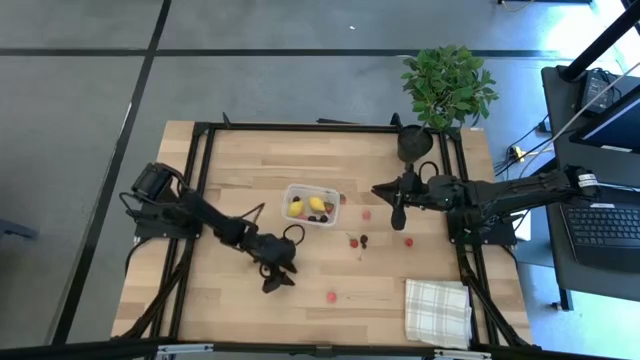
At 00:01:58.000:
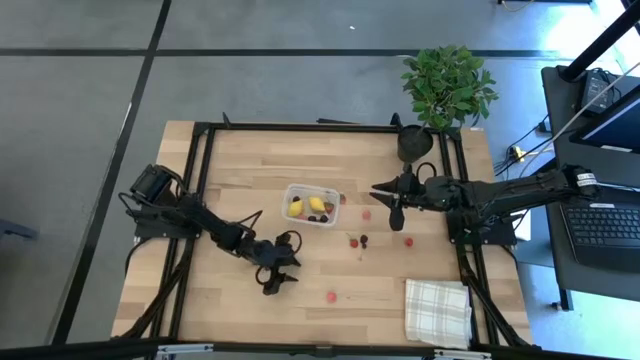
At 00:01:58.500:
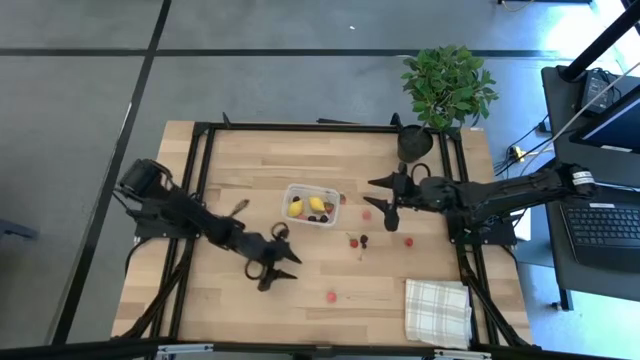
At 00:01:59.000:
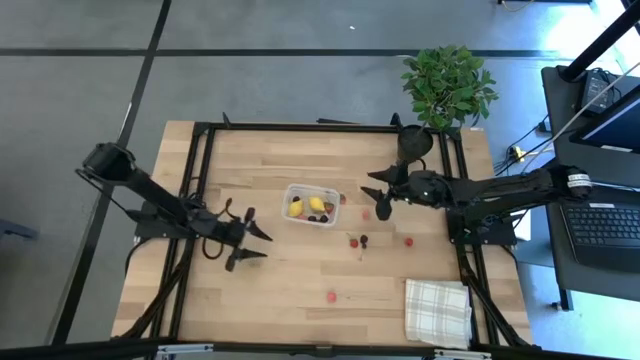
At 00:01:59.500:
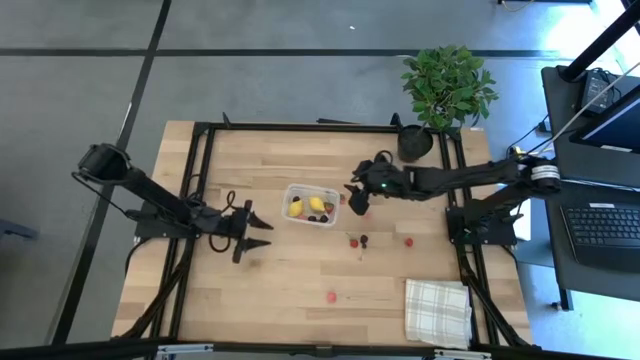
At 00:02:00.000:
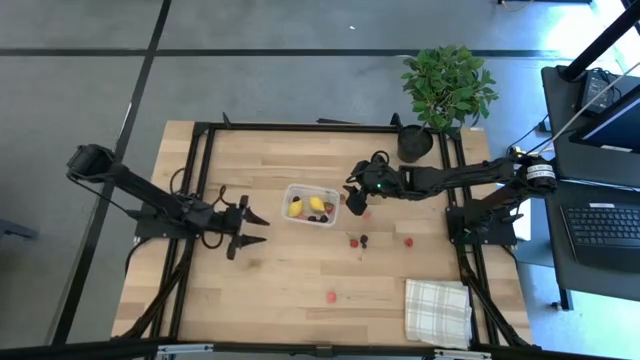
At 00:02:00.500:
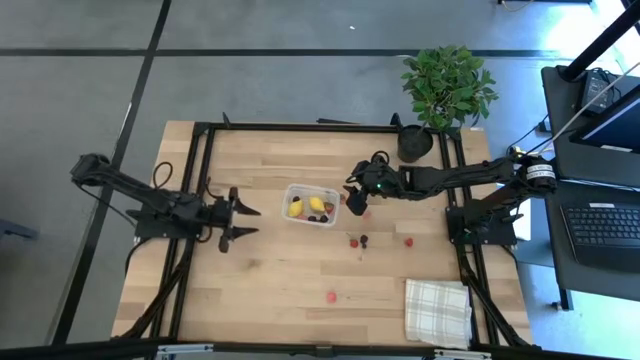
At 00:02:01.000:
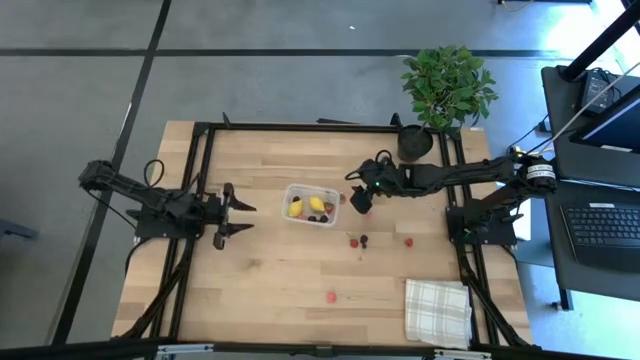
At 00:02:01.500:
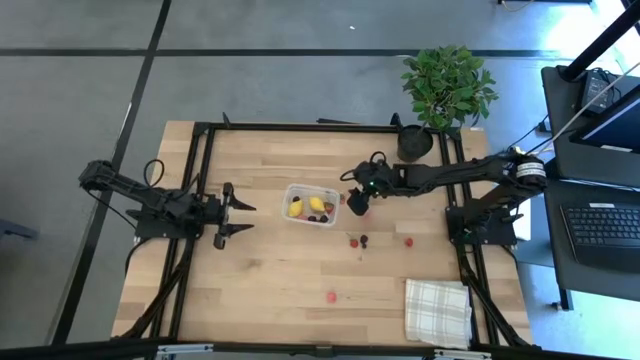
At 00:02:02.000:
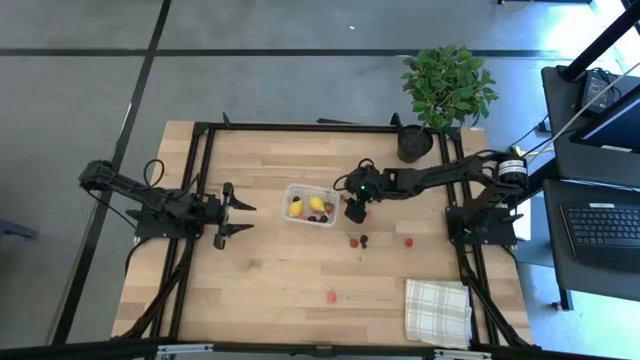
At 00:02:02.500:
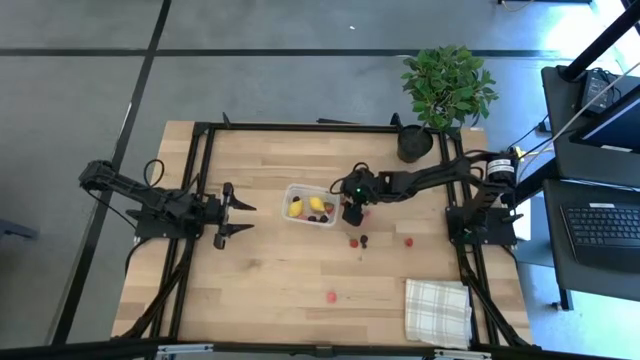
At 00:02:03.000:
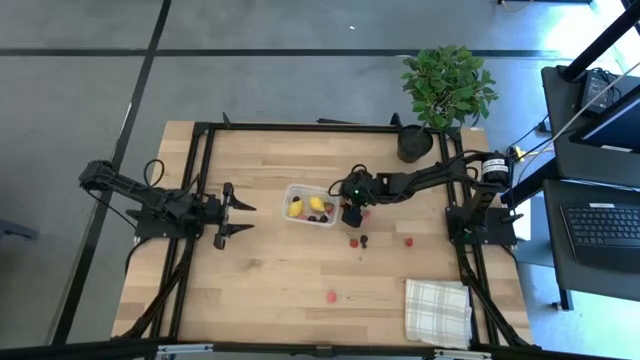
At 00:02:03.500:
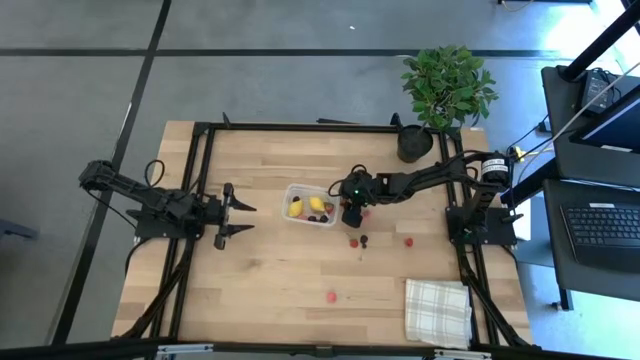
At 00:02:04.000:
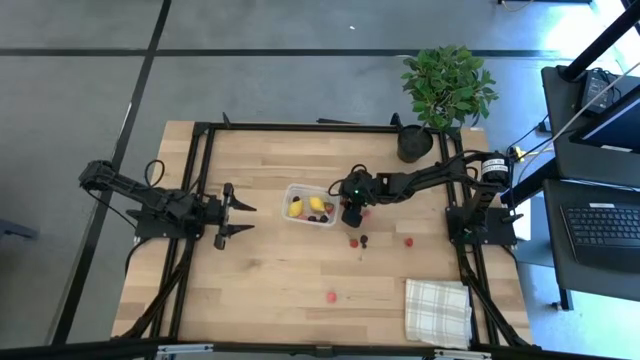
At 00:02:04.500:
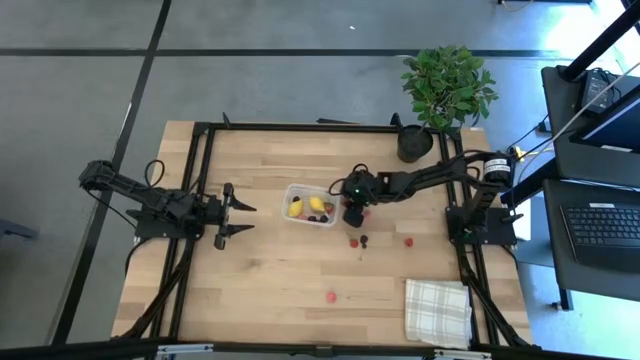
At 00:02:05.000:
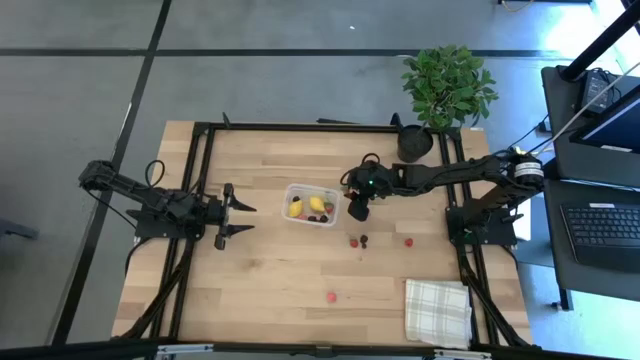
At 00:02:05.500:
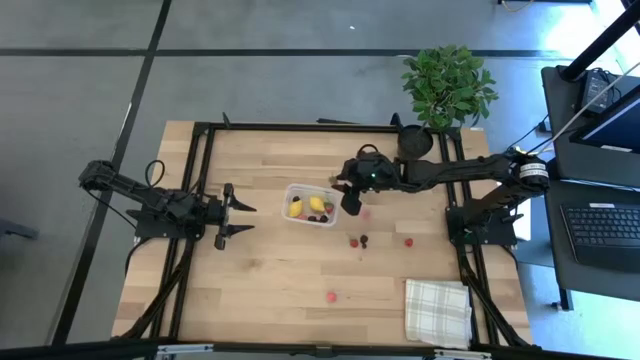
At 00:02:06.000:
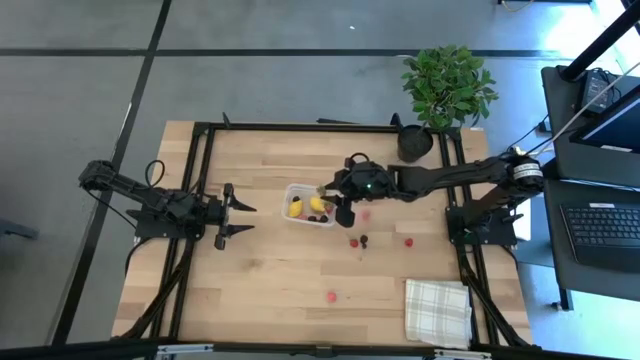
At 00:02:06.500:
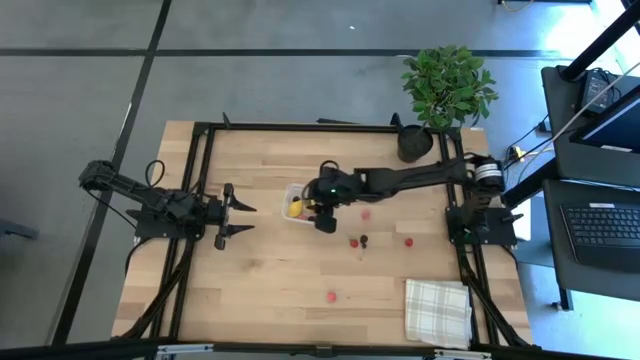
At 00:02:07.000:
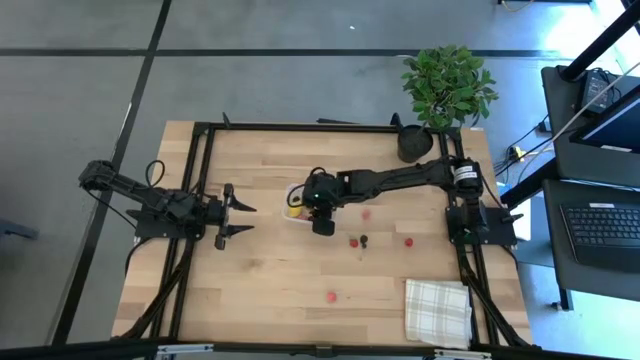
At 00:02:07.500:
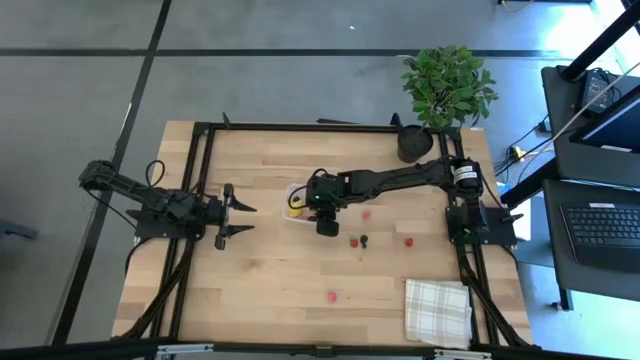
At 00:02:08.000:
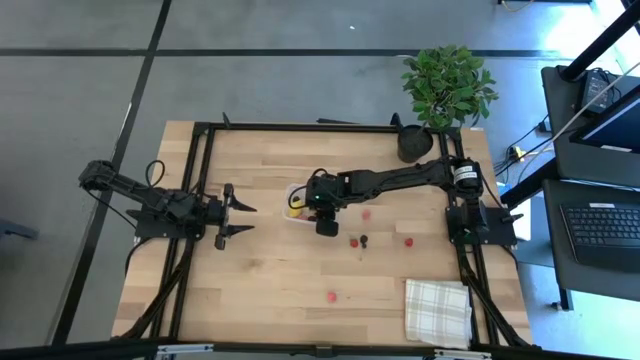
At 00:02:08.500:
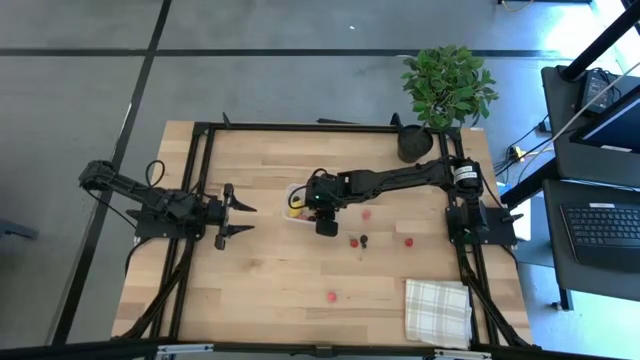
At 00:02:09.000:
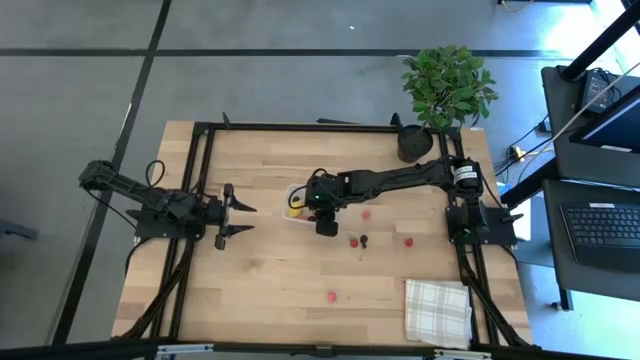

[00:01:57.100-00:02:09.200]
Task: Pick and placing Produce into tupperware
Put the top strawberry into the transparent bin

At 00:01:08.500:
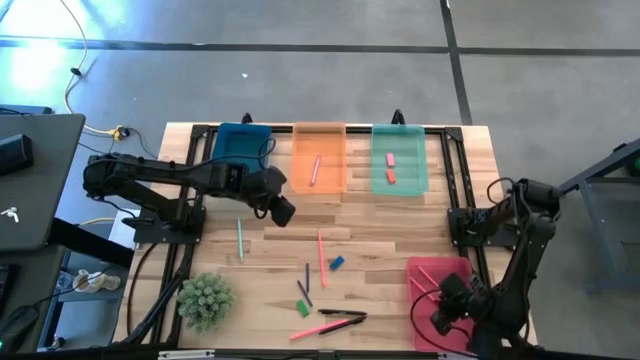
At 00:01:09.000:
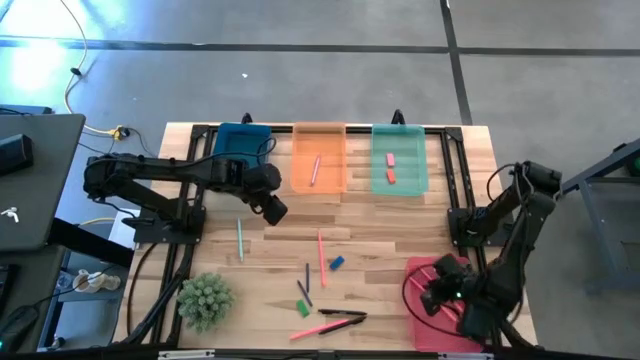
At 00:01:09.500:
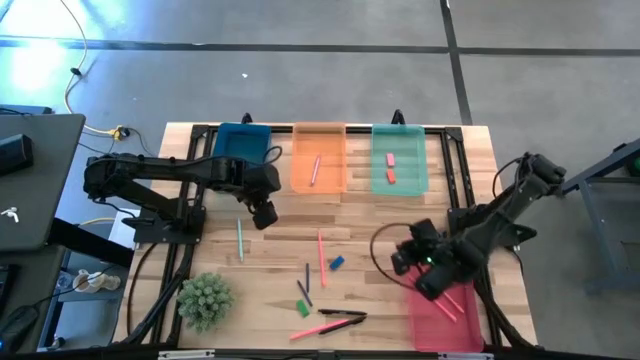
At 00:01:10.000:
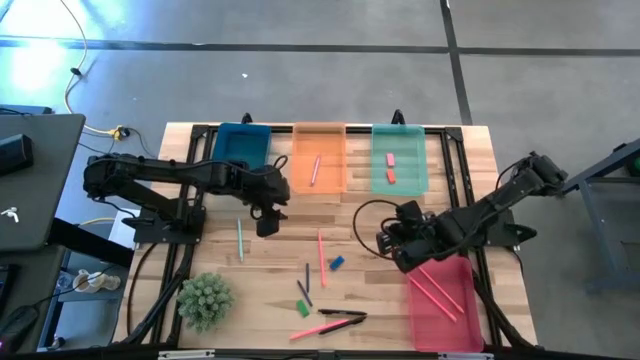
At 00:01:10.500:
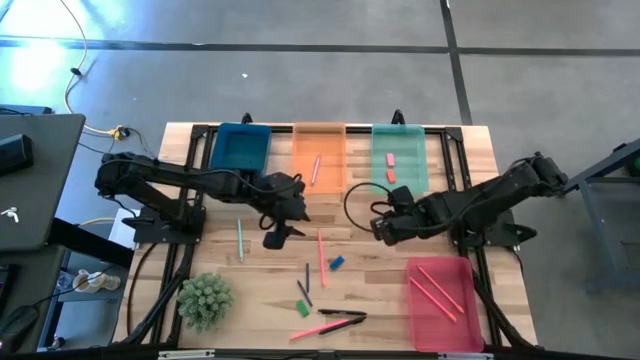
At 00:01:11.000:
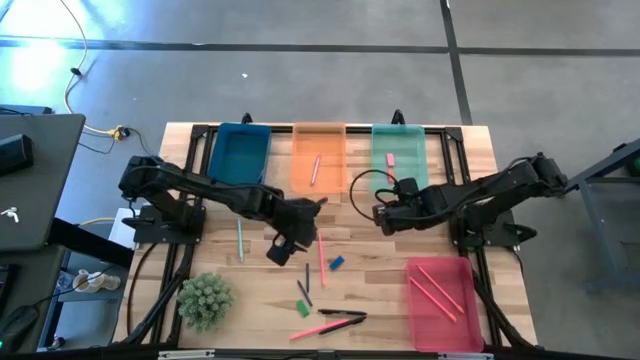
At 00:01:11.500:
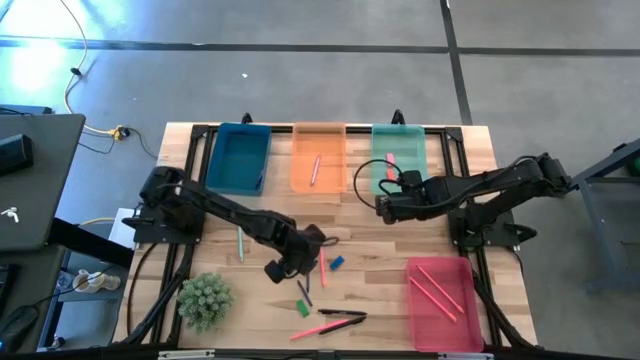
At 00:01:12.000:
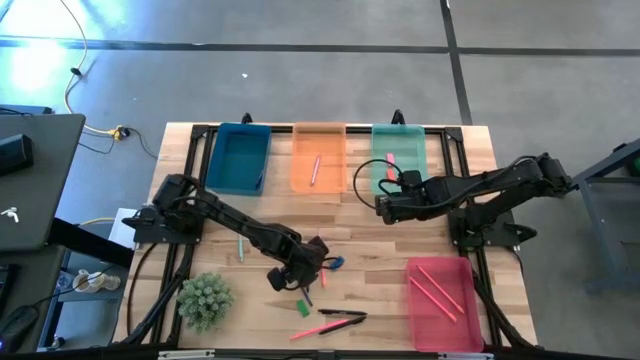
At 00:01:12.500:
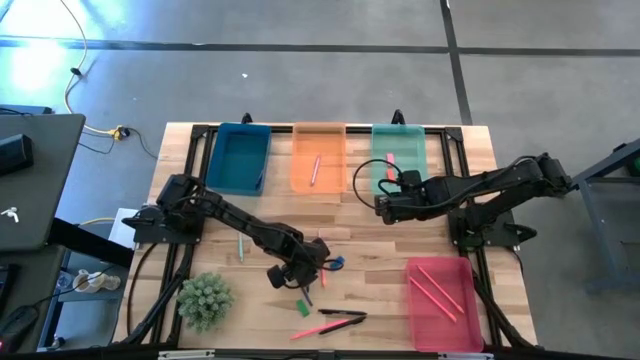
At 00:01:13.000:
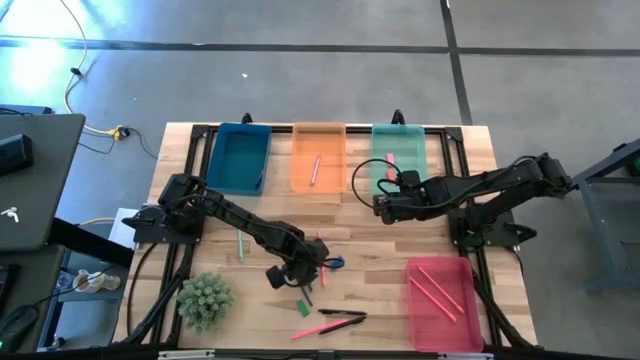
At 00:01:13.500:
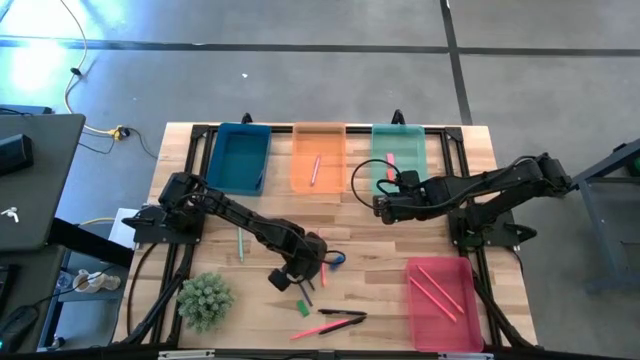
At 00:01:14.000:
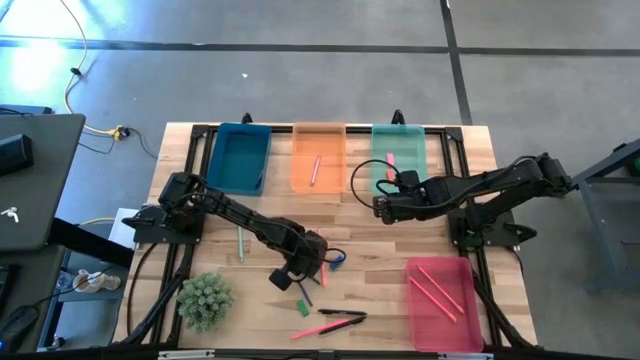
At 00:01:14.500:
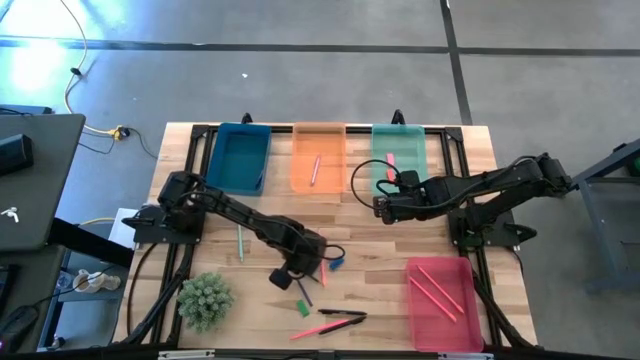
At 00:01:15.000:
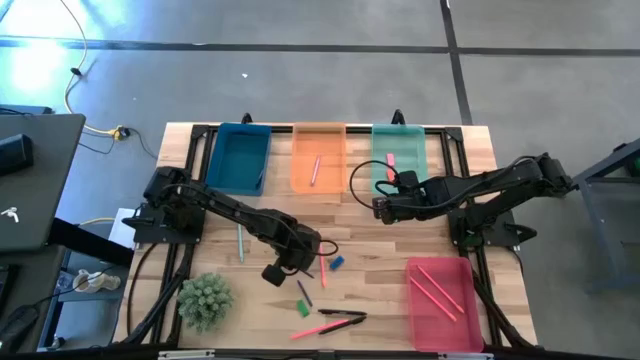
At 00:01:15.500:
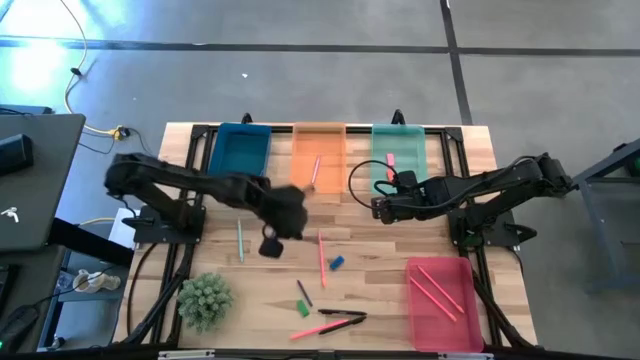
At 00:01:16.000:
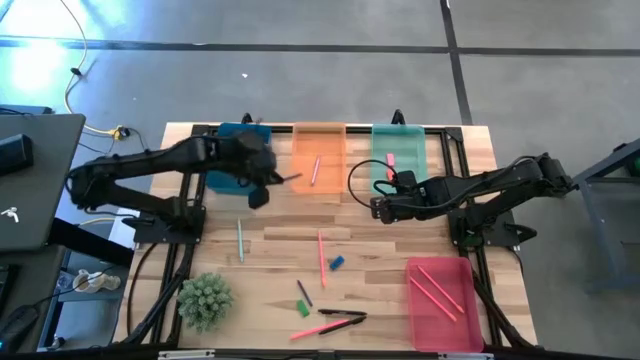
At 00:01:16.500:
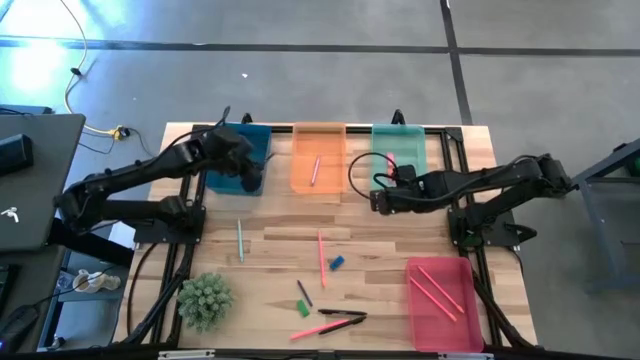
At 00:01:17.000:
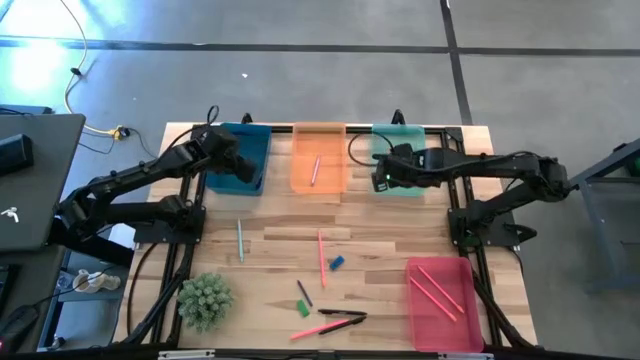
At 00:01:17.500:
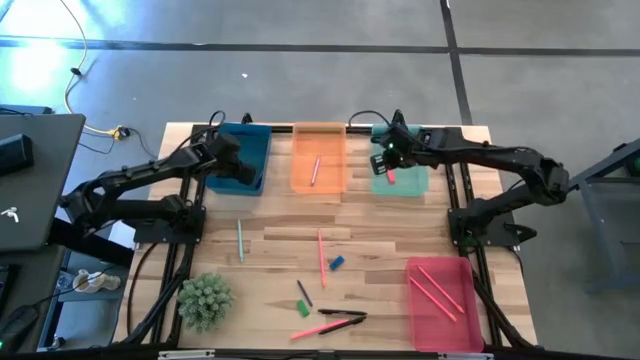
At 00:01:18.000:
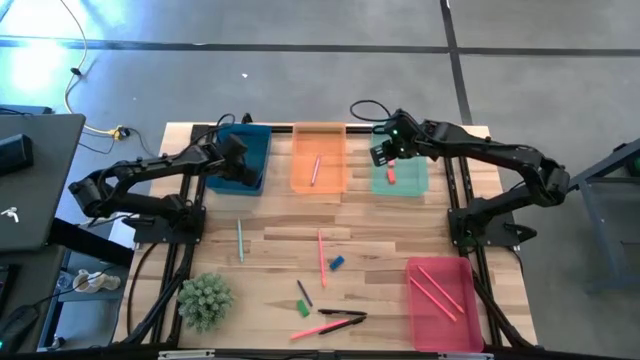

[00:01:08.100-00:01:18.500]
Task: Sort crayons/erasers/pens/pencils in bins
Put the right blue crayon into the blue bin
